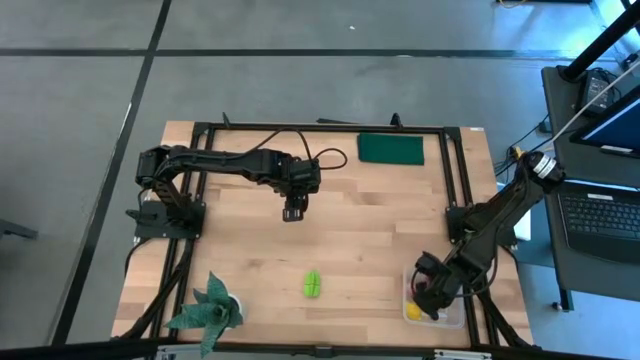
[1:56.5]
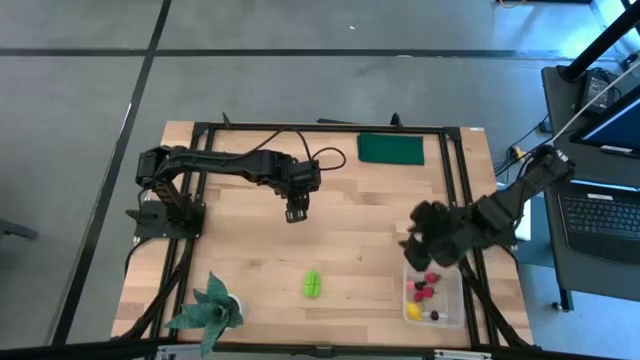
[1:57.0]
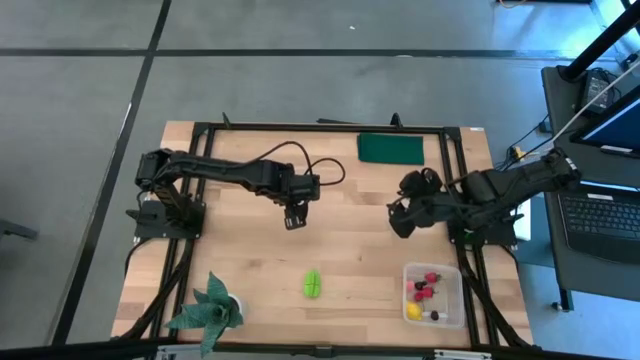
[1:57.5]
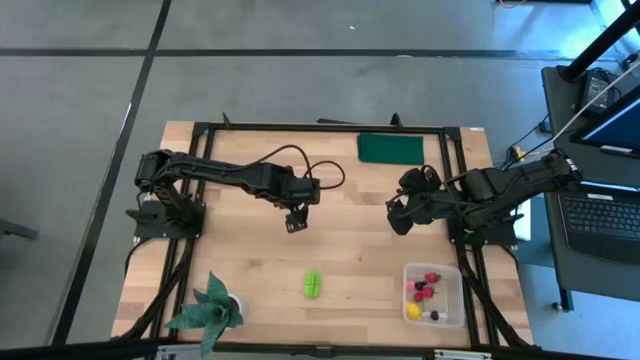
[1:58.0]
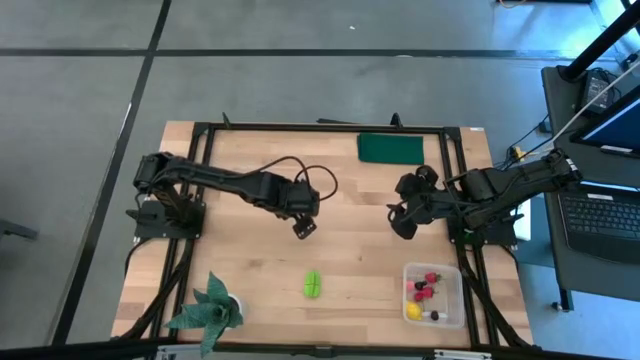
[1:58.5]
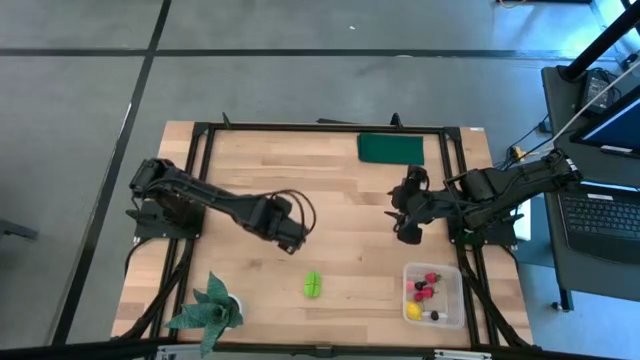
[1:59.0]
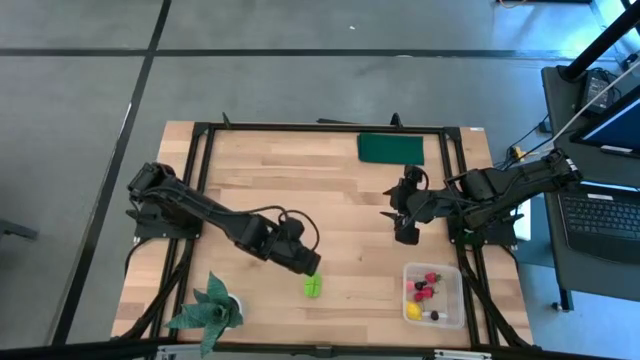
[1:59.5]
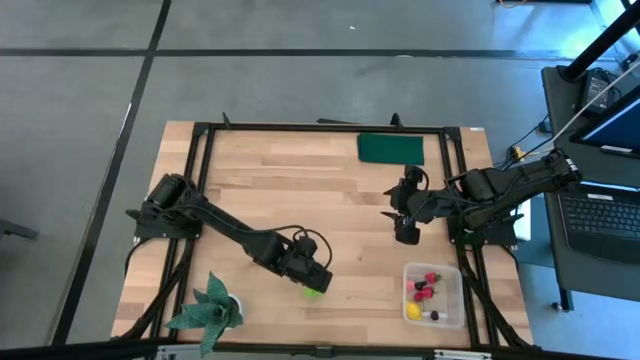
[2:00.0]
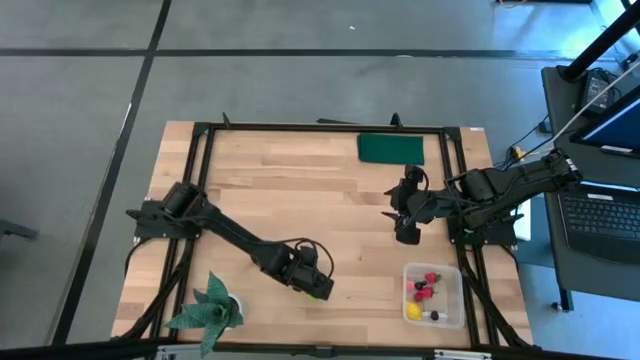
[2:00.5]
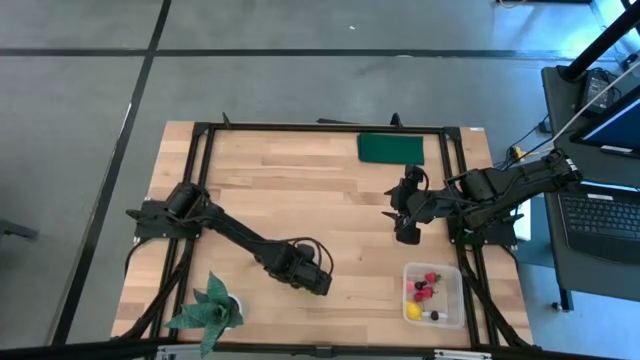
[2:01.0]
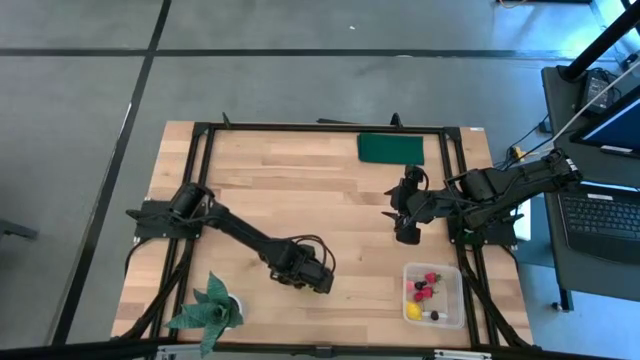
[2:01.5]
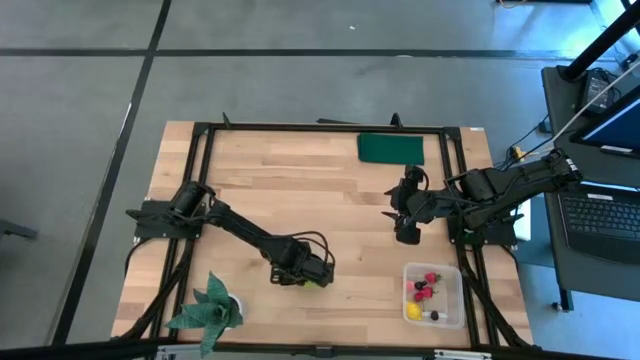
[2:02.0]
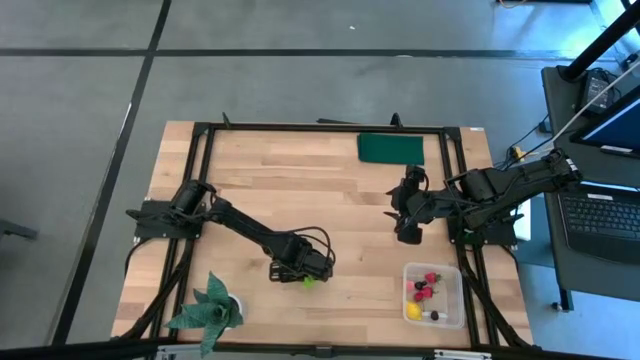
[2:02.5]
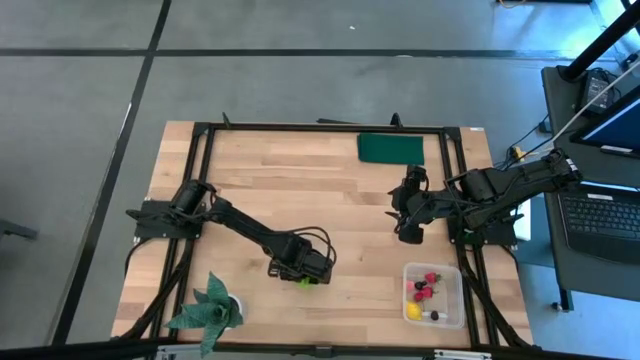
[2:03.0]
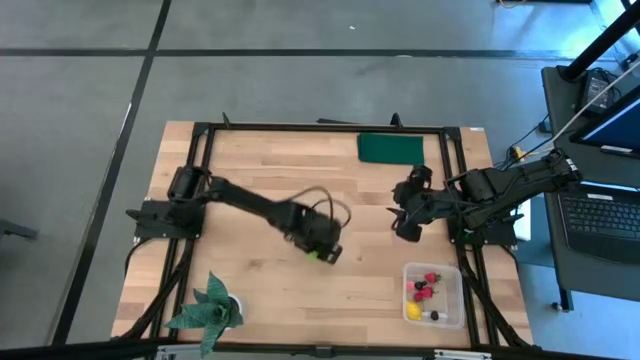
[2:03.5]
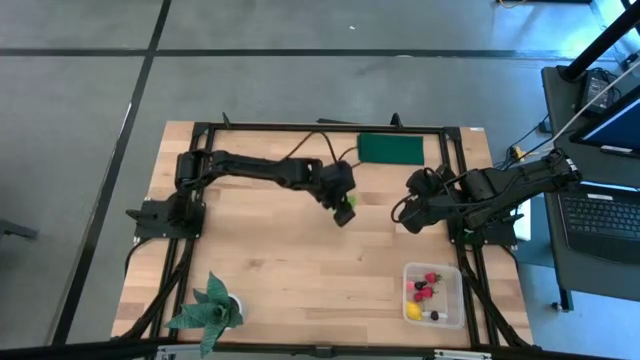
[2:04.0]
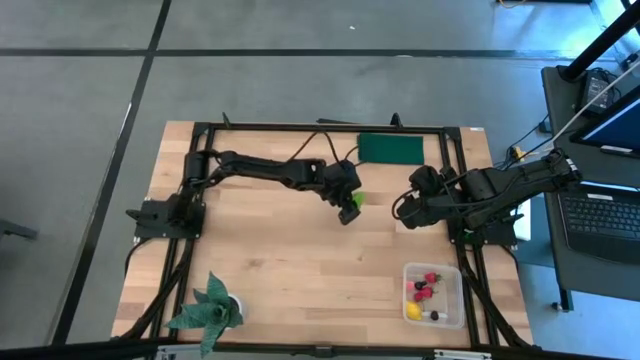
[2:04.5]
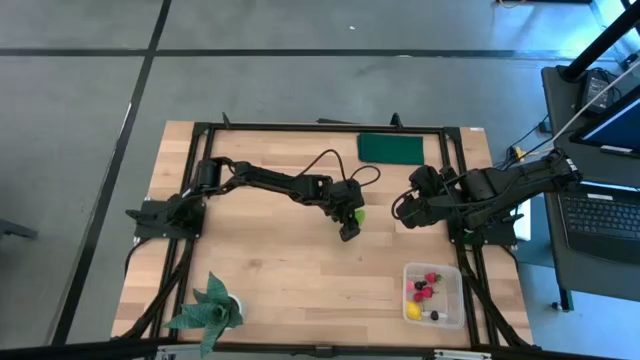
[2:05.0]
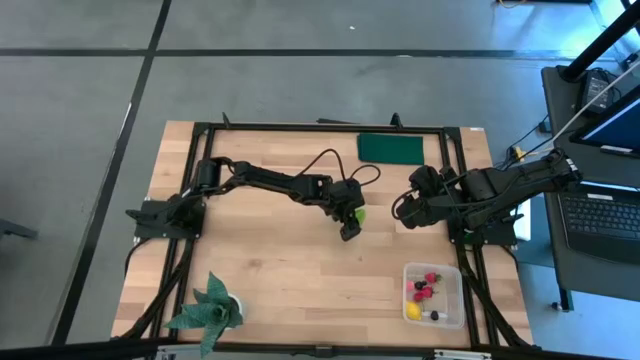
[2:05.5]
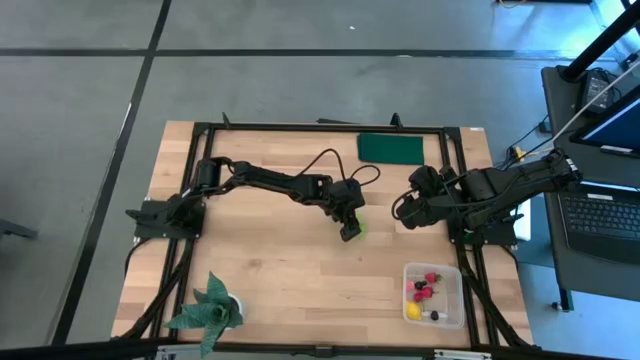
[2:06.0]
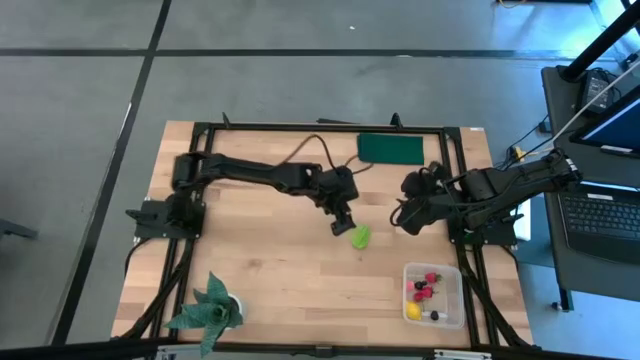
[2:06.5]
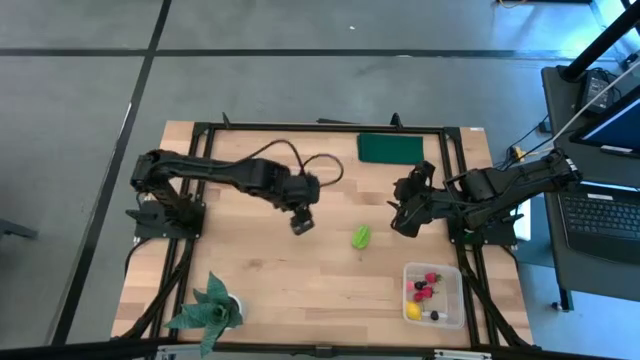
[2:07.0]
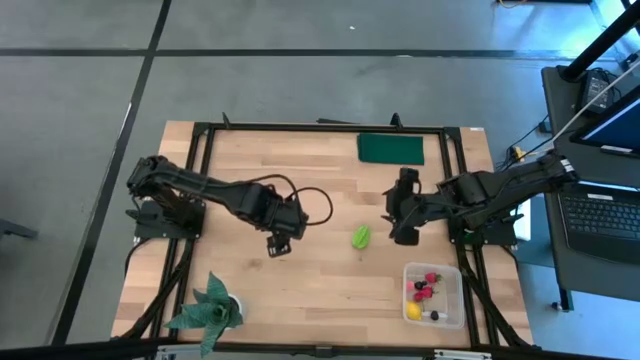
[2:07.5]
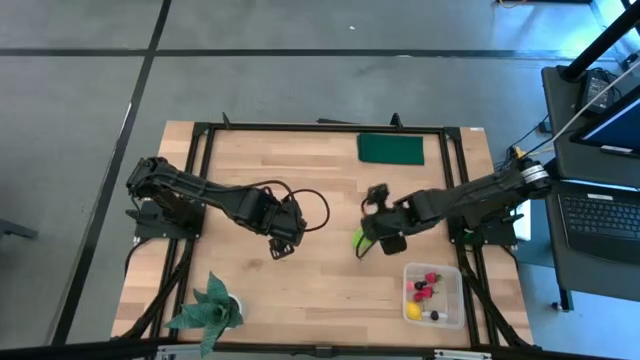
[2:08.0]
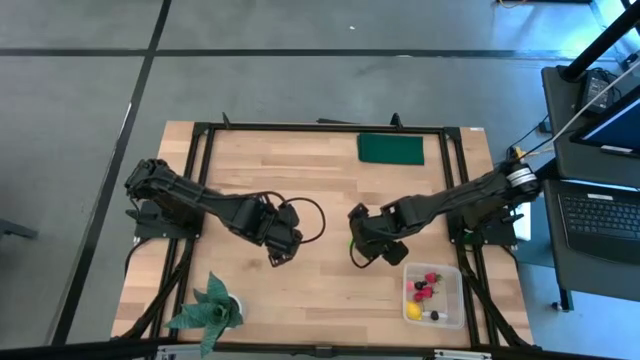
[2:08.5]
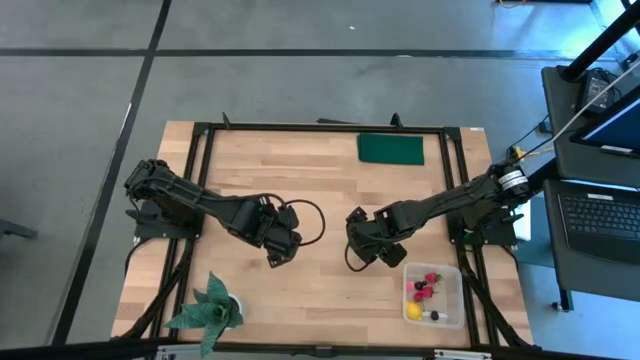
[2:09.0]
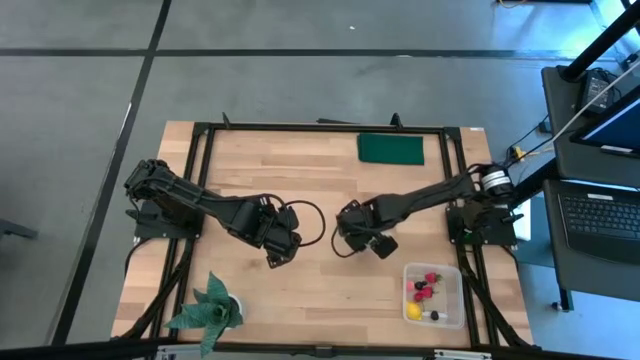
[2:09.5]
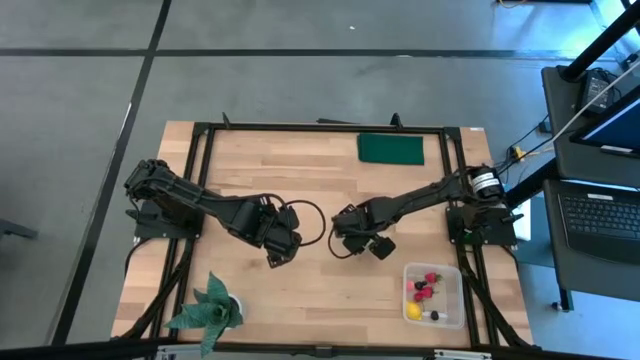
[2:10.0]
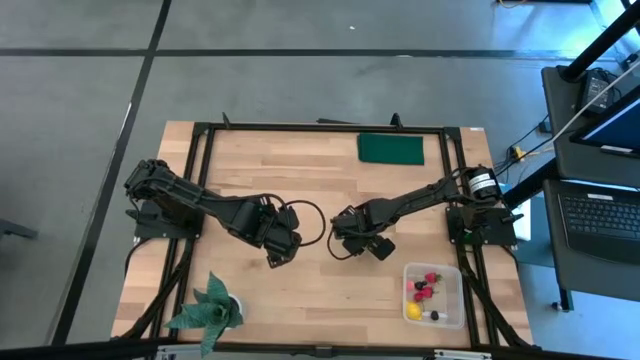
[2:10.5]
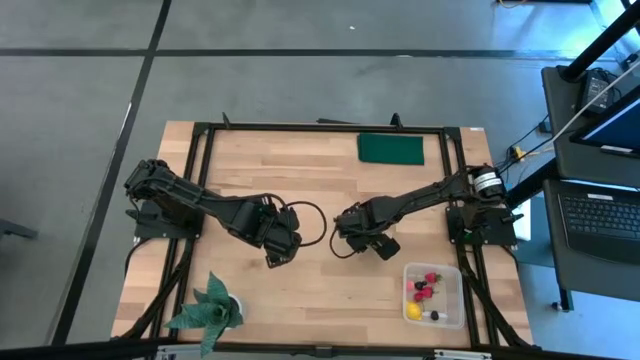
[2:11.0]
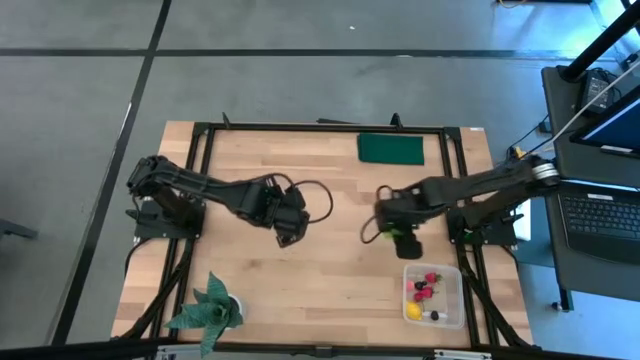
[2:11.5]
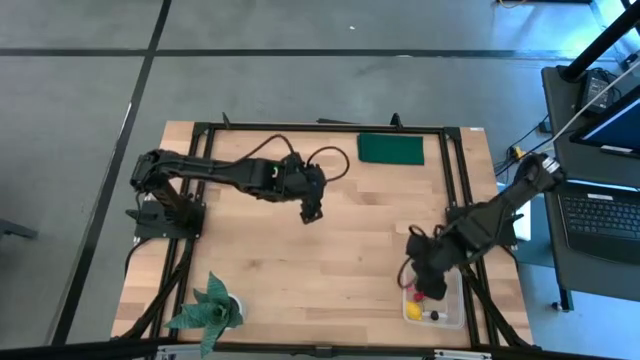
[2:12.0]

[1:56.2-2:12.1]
Task: Pick and placing Produce into tupperware
Put the green starfruit into the transparent bin

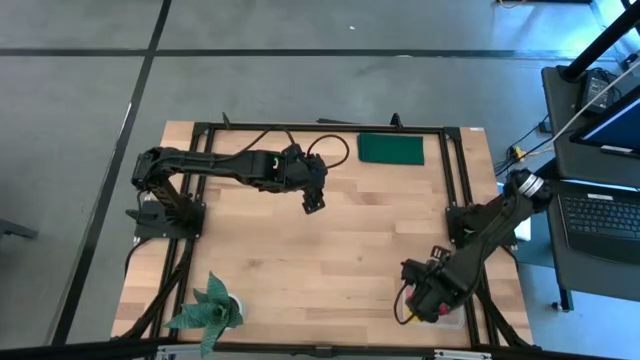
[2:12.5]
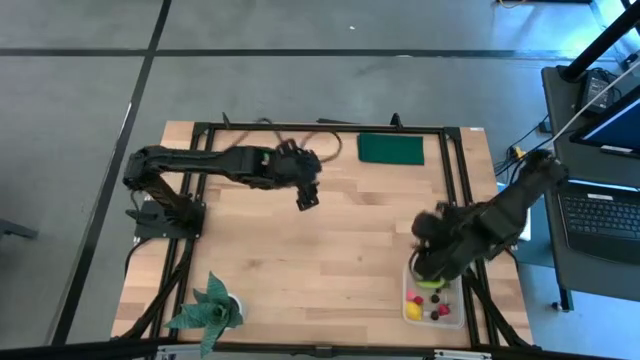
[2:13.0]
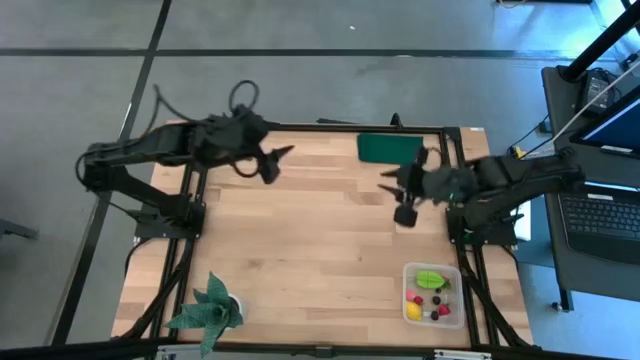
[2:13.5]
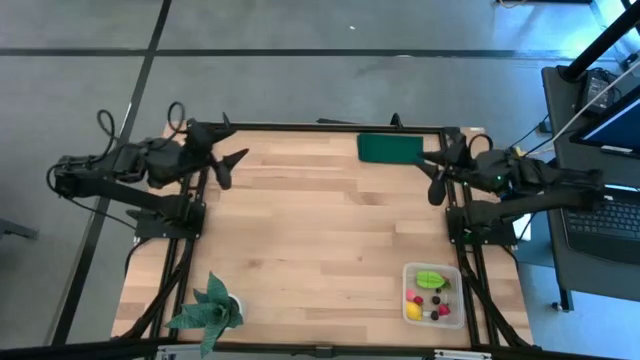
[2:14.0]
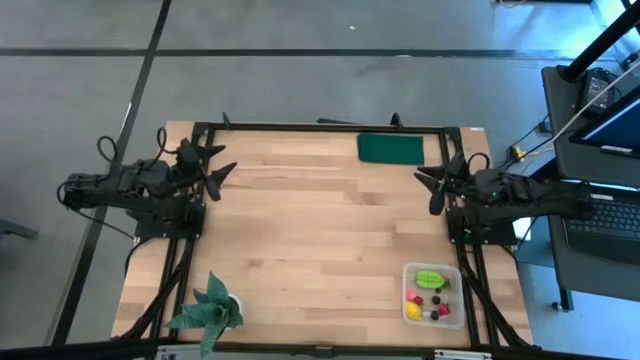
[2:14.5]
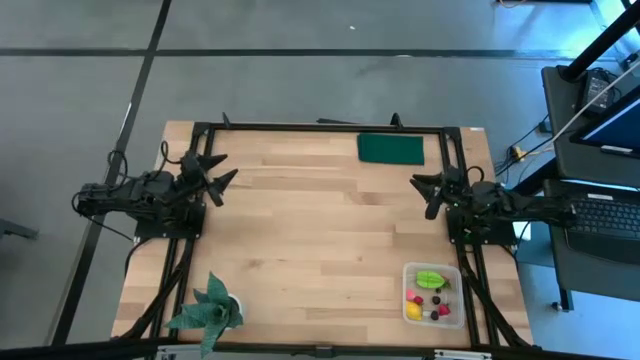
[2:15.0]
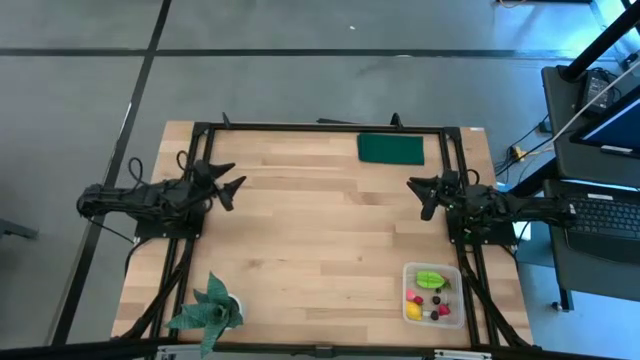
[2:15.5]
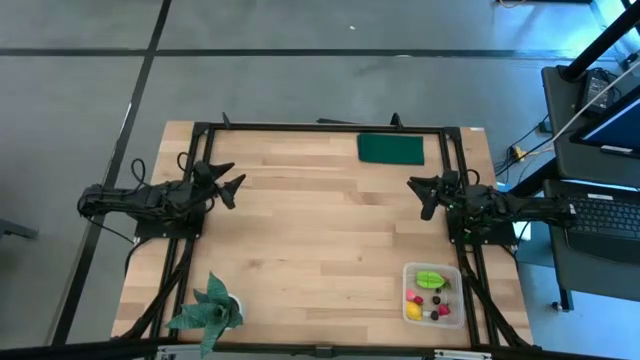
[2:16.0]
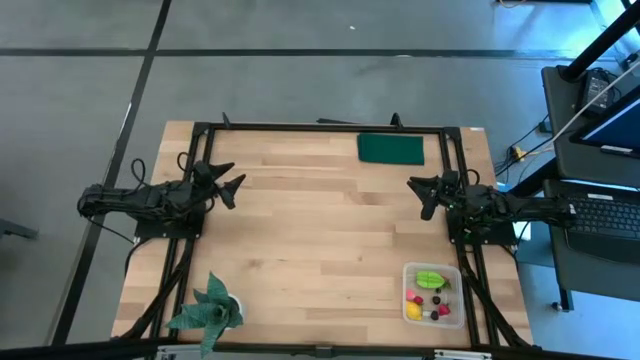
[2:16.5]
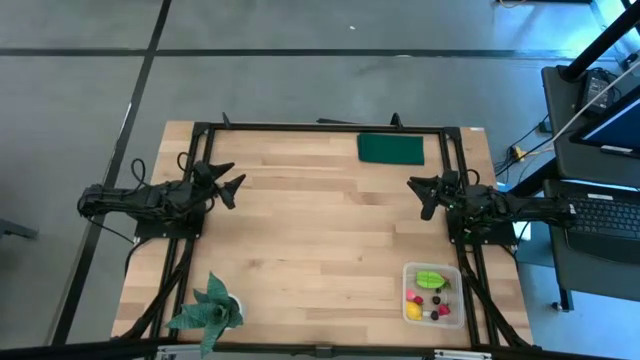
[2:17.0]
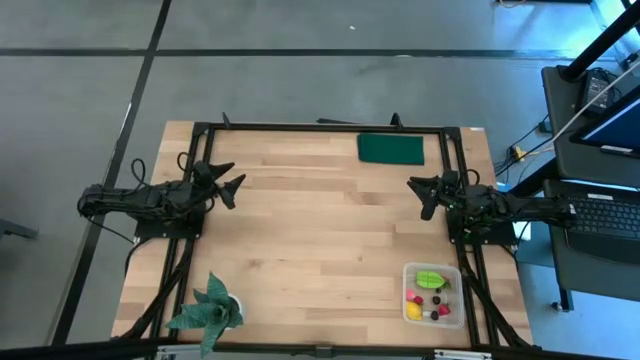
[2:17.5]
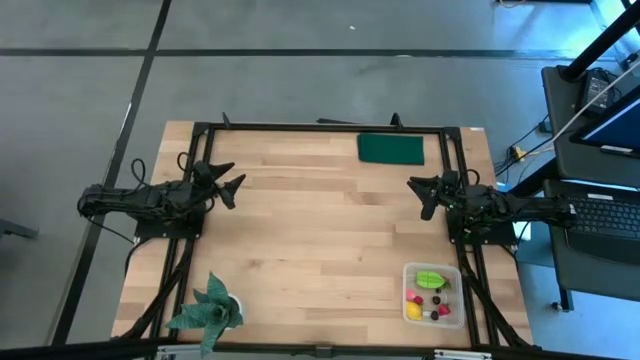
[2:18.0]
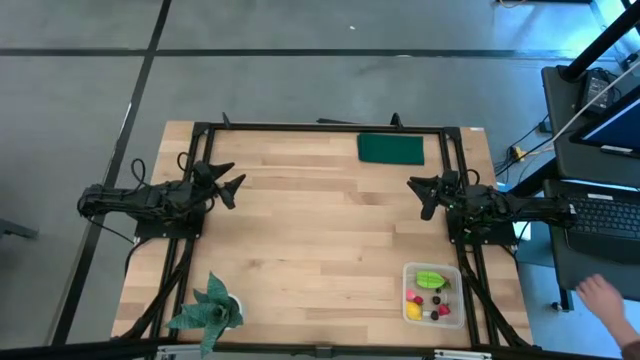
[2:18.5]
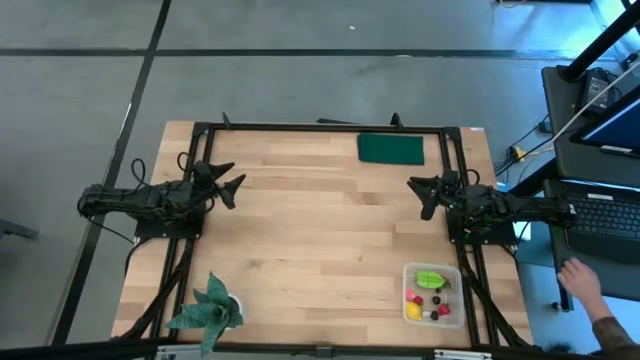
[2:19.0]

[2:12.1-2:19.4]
Return to Home Position
